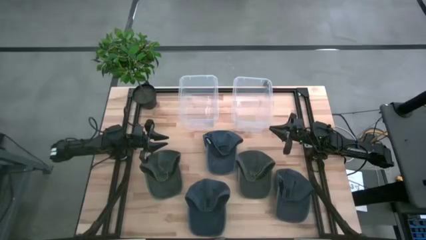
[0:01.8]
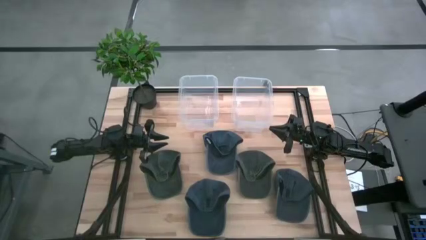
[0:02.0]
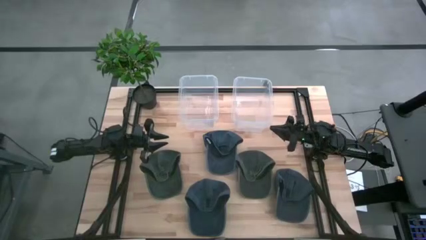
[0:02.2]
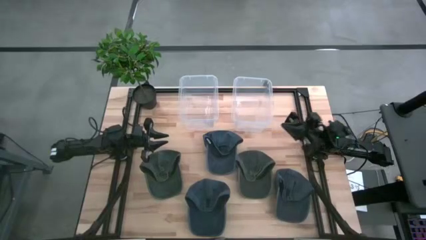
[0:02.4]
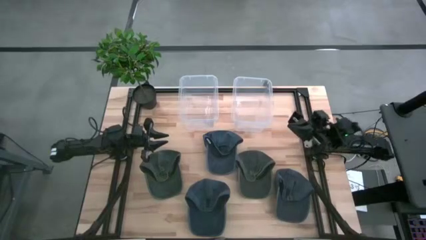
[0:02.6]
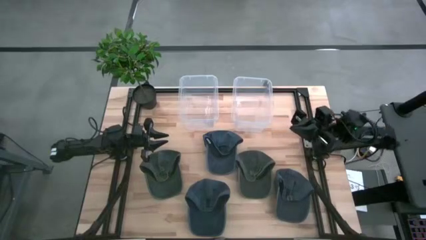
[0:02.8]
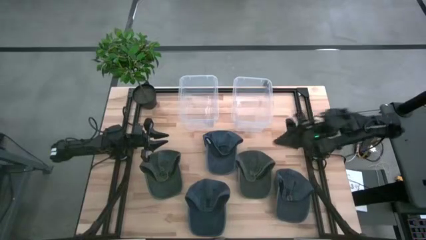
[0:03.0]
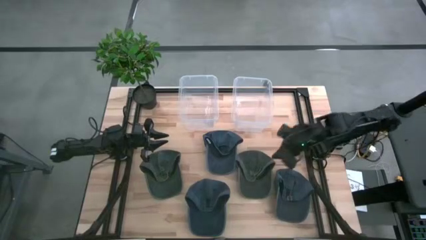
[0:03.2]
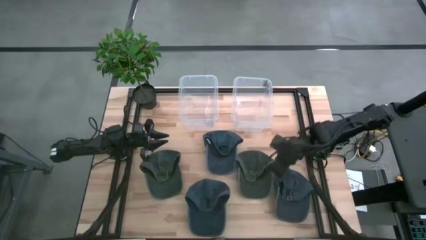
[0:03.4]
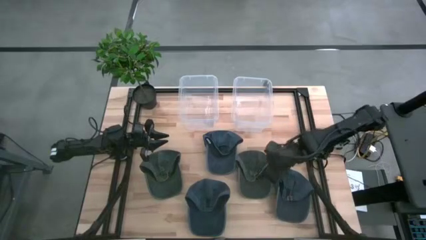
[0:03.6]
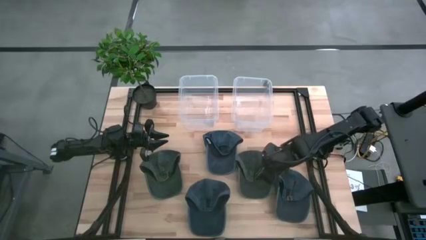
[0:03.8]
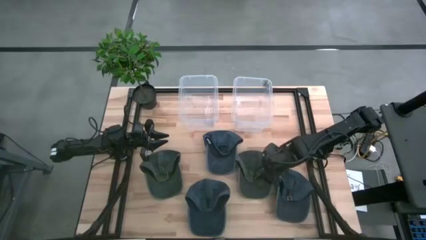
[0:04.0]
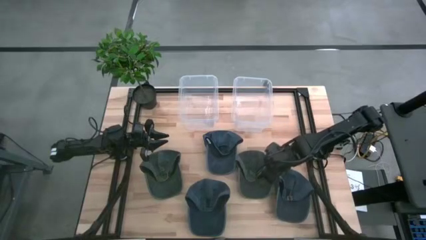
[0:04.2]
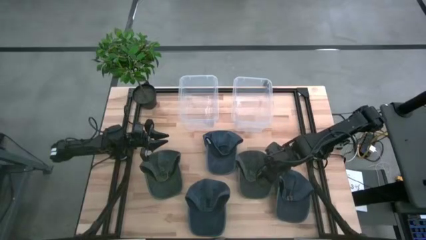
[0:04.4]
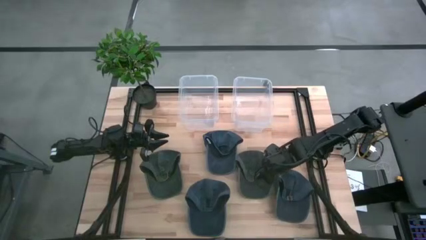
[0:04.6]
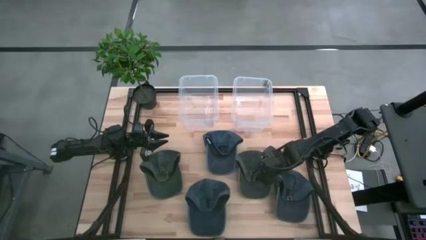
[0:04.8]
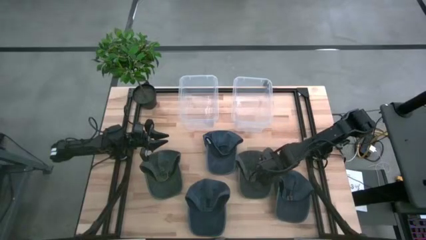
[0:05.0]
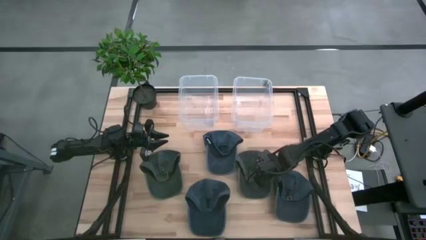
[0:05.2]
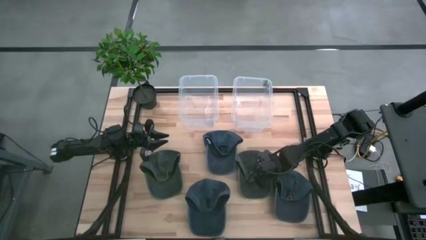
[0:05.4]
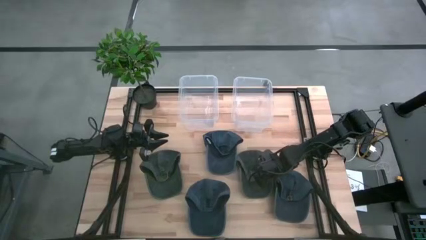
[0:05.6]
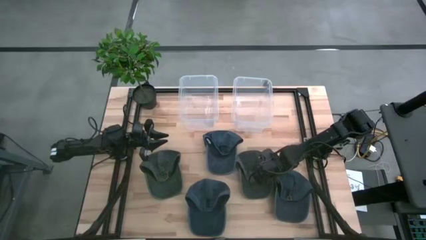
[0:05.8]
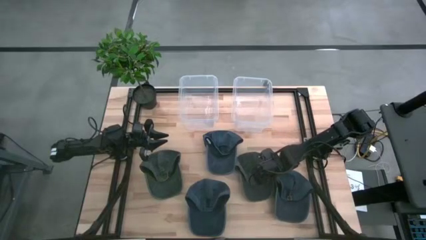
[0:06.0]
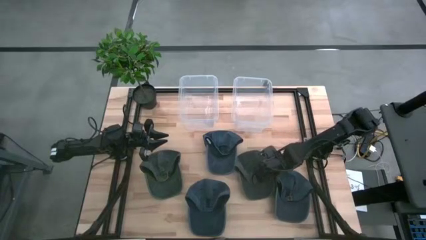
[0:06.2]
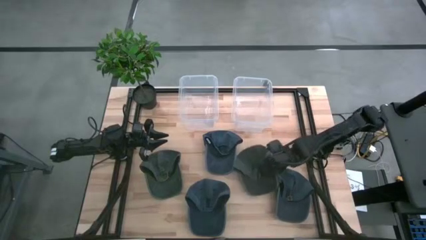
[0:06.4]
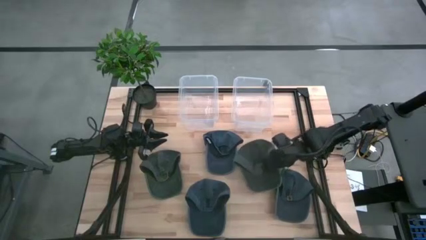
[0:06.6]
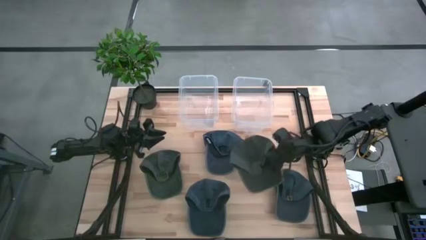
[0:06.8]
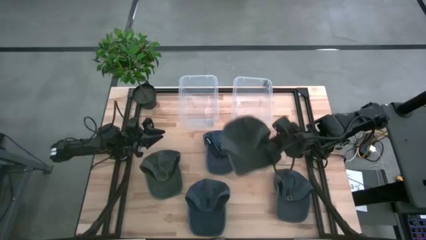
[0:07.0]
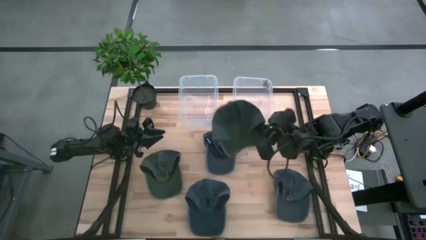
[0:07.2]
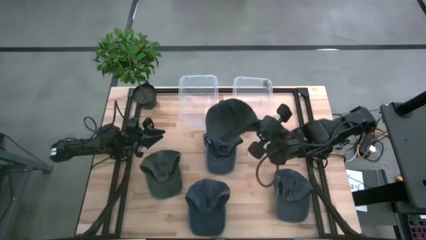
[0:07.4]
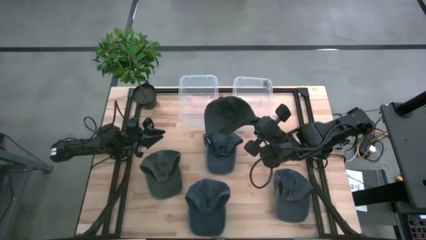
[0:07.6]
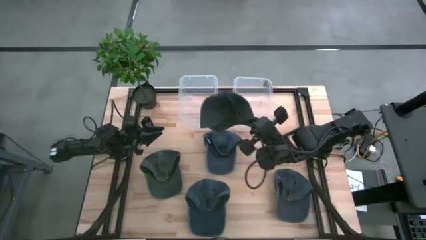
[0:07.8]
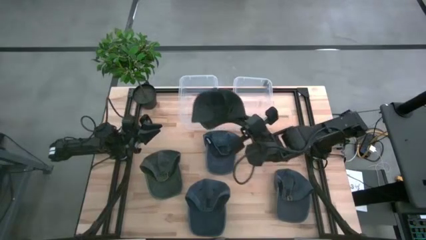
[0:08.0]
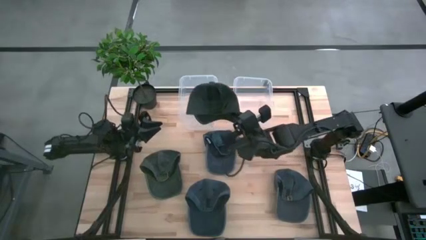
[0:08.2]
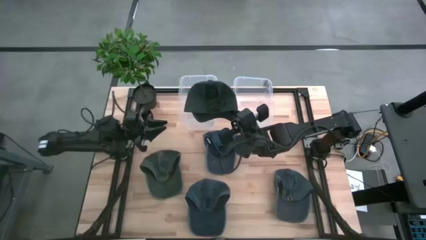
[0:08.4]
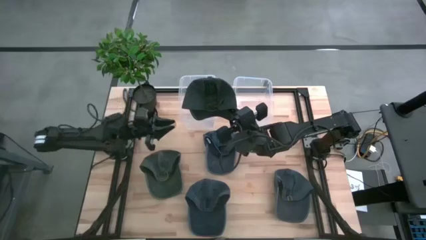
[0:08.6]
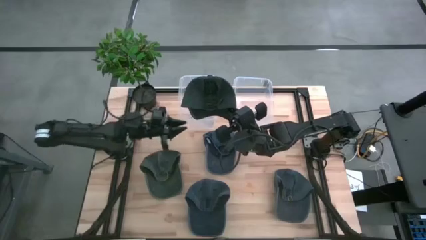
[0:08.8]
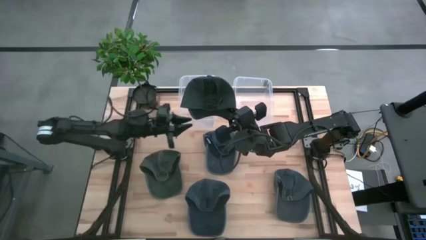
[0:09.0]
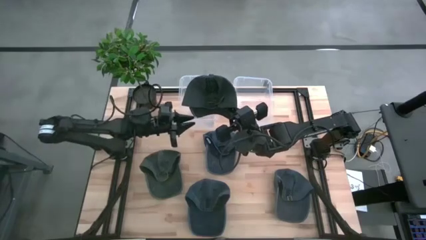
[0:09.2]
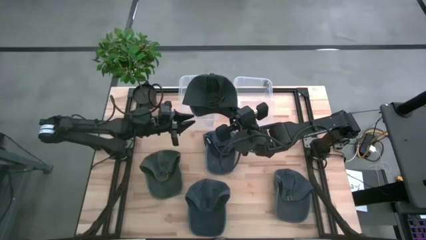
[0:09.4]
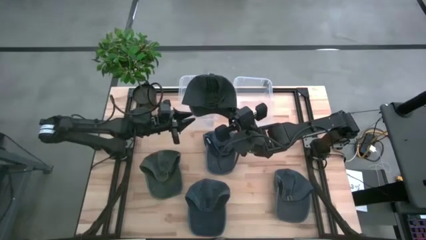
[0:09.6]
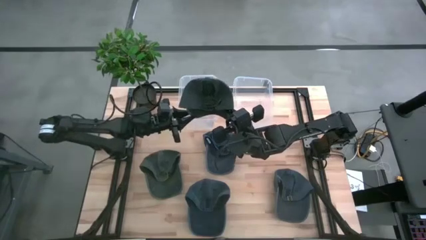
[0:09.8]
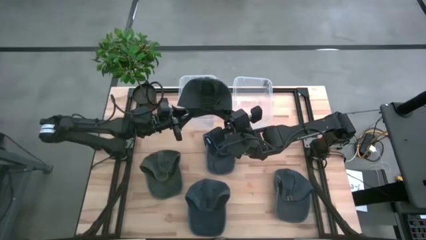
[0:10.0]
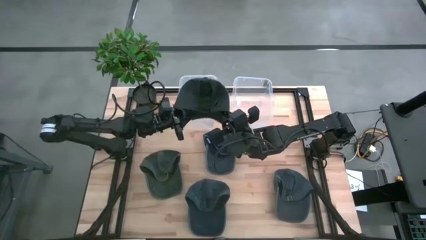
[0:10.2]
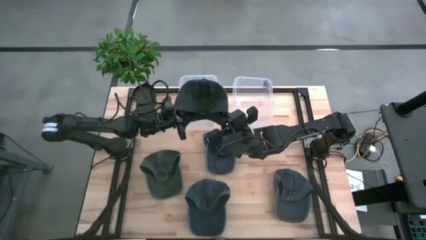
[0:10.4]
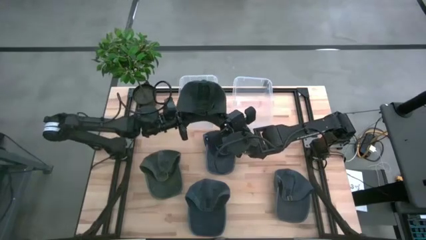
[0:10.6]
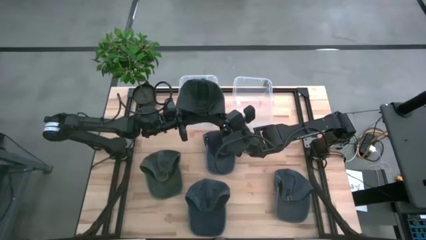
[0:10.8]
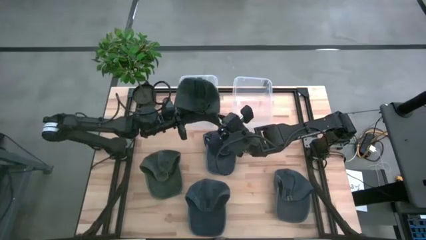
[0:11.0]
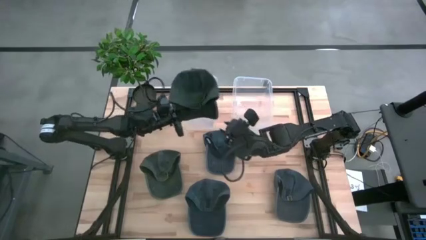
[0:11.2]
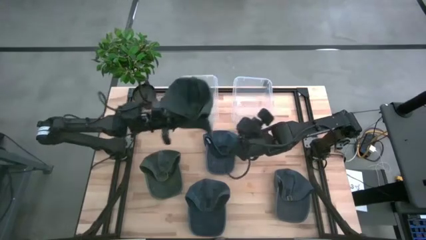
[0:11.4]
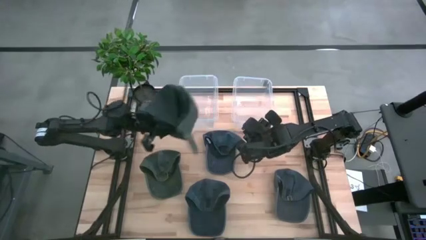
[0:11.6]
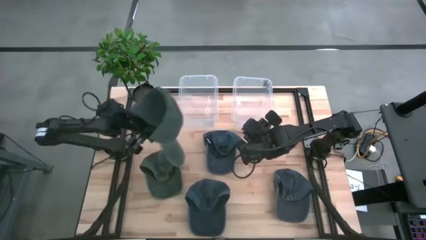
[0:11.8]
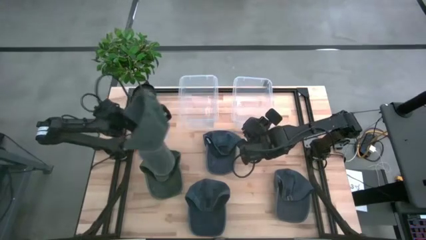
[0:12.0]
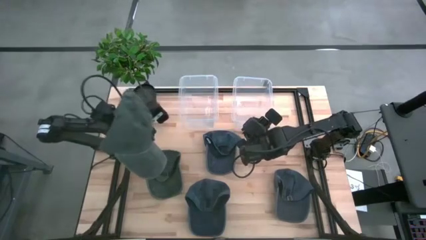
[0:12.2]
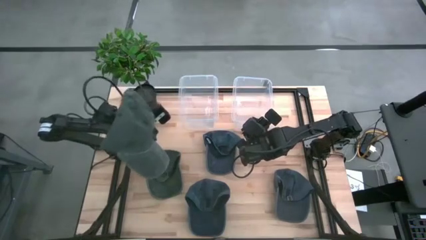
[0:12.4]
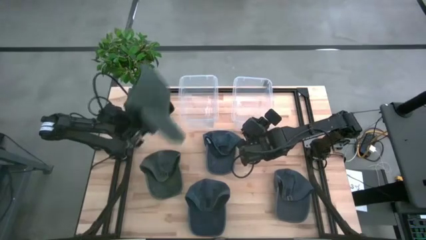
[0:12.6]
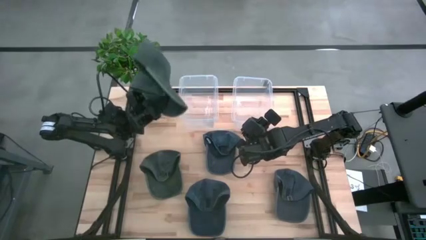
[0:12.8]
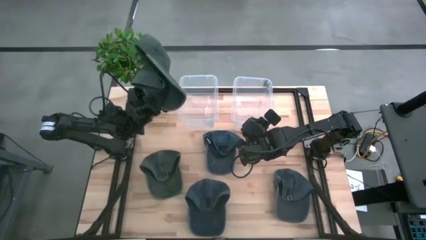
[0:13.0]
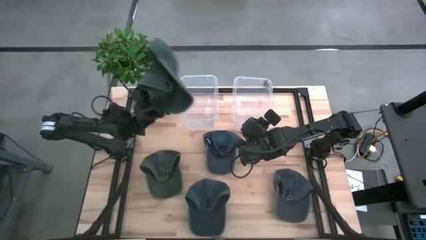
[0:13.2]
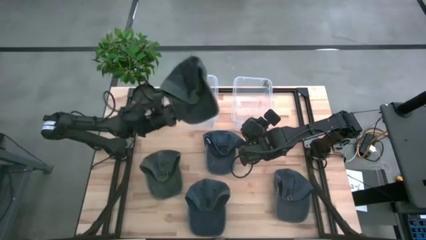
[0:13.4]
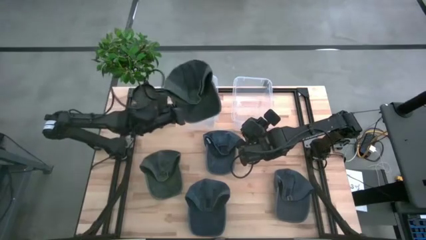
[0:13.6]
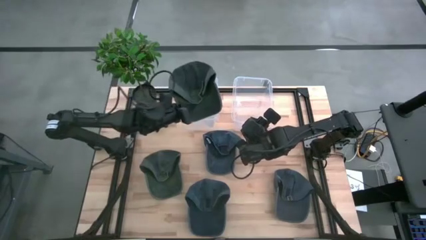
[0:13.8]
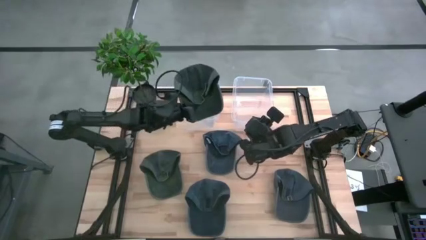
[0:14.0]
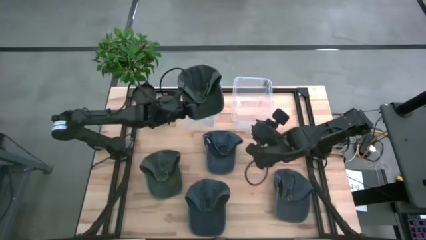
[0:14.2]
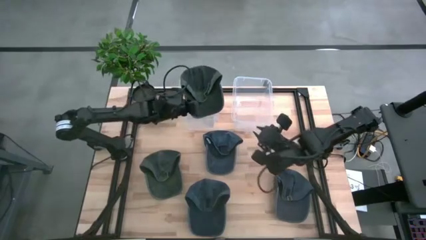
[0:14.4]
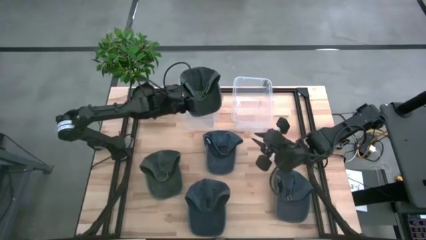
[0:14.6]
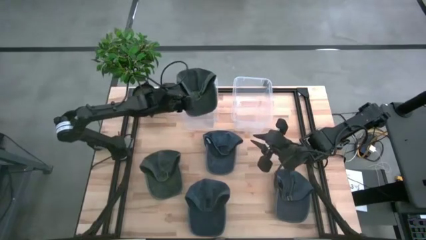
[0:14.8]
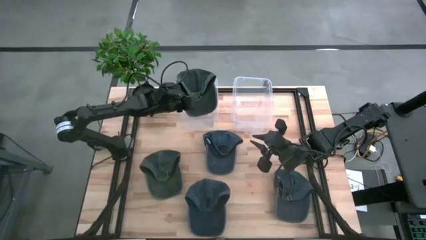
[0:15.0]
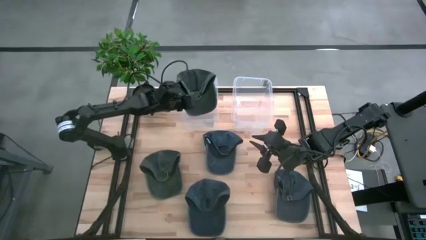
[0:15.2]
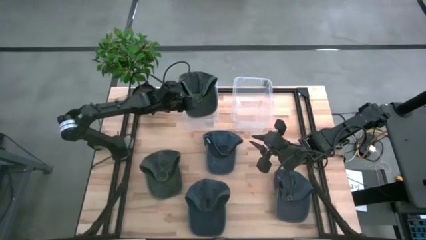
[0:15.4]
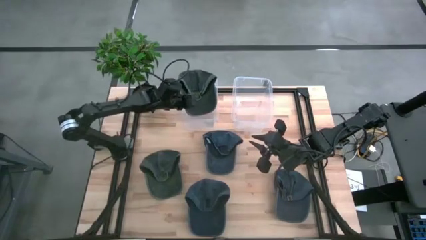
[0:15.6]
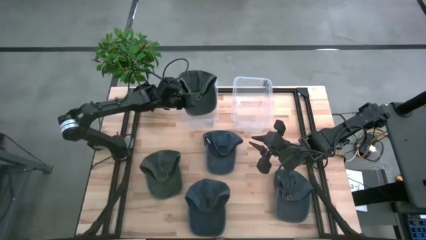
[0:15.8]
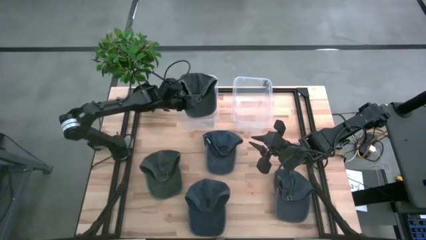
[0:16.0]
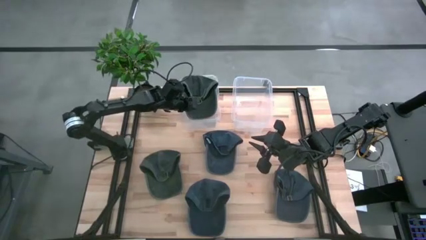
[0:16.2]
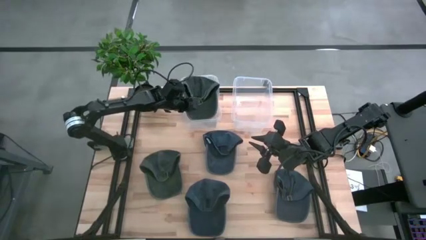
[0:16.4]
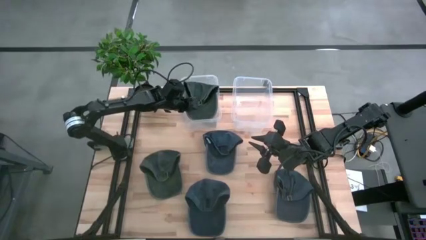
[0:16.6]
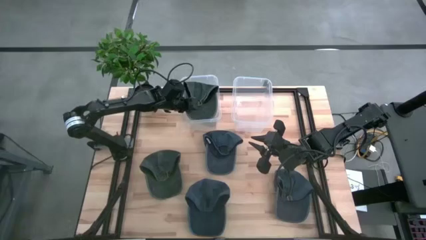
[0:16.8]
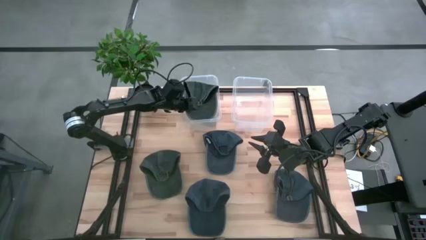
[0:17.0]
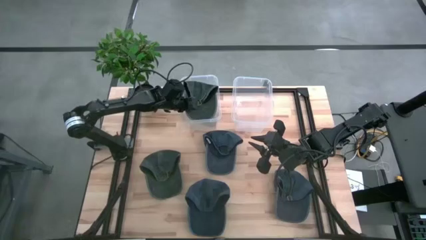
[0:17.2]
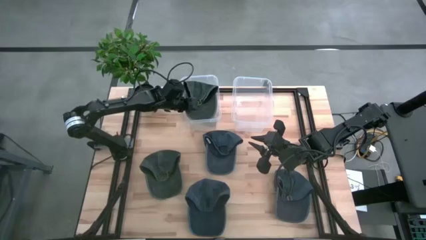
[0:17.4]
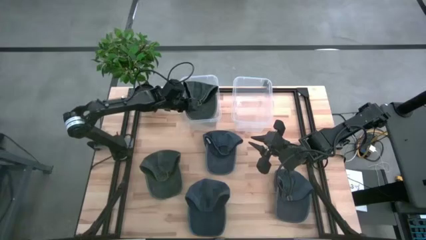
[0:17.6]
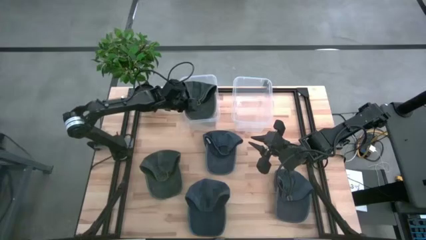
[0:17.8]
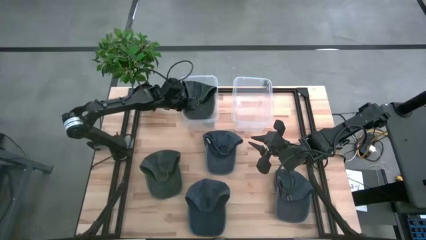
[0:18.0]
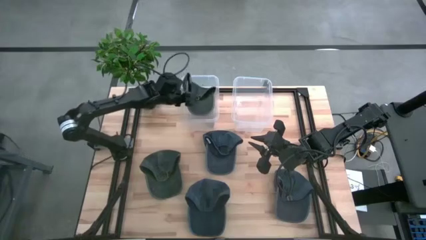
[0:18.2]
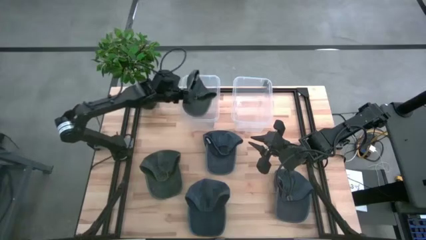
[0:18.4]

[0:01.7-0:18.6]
Task: Pick & Place hat
Put the right green cap into the left transparent bin
